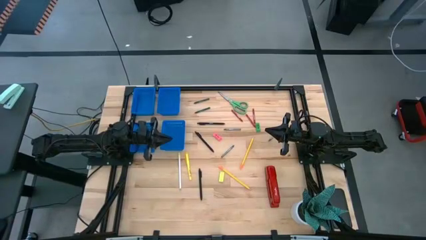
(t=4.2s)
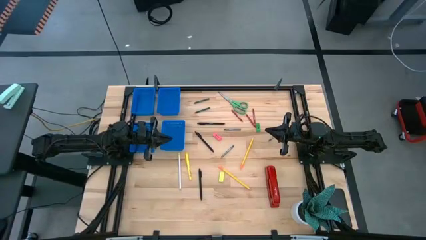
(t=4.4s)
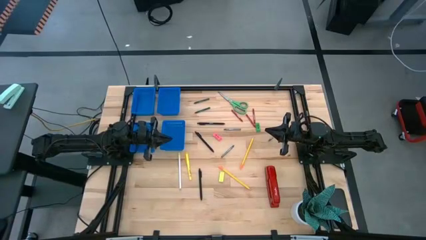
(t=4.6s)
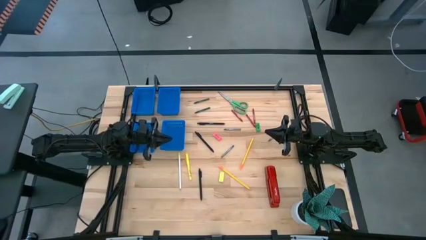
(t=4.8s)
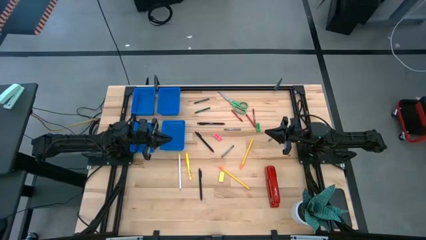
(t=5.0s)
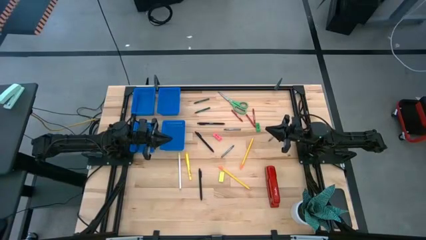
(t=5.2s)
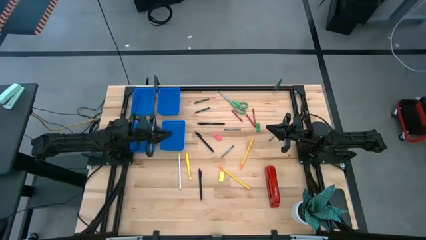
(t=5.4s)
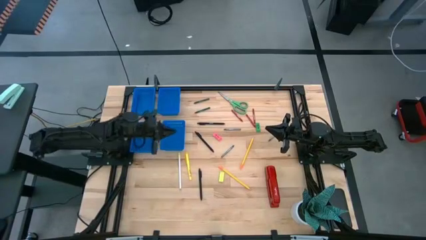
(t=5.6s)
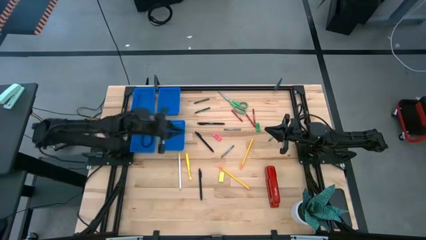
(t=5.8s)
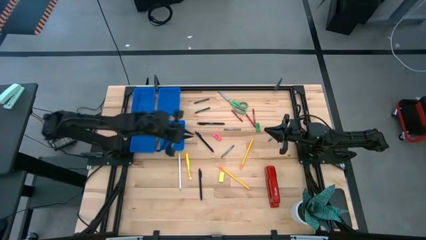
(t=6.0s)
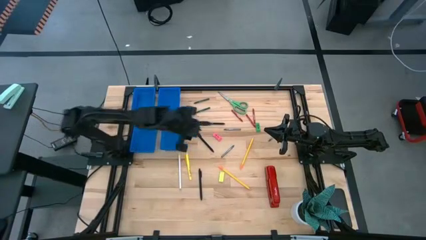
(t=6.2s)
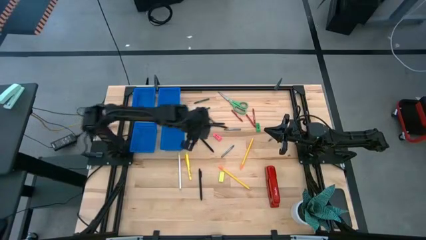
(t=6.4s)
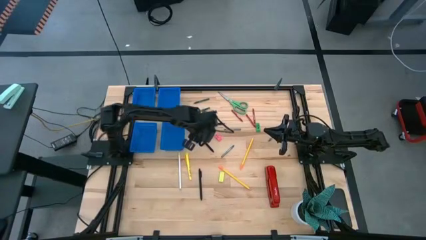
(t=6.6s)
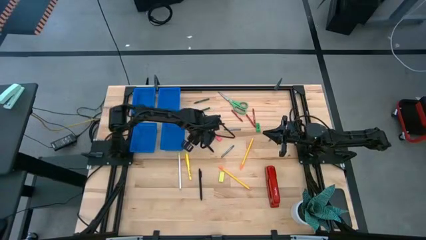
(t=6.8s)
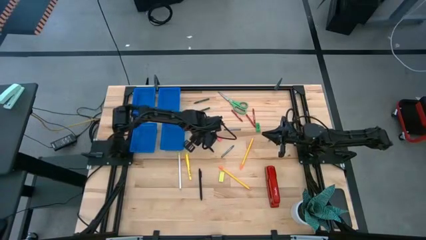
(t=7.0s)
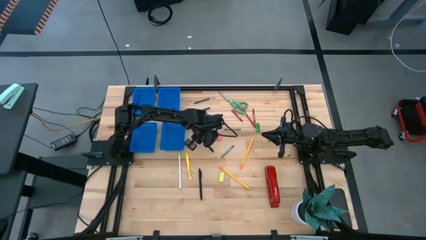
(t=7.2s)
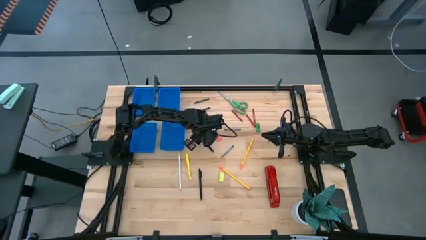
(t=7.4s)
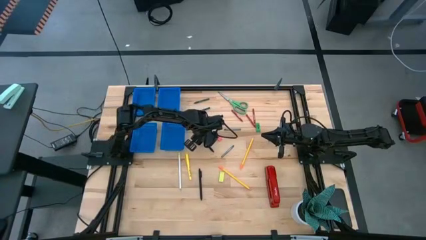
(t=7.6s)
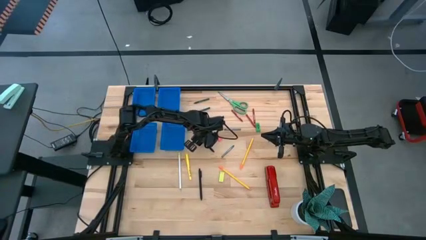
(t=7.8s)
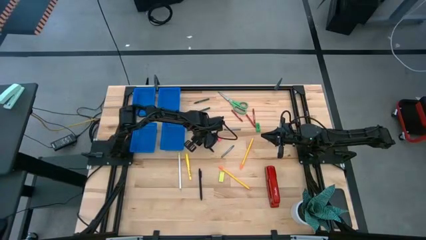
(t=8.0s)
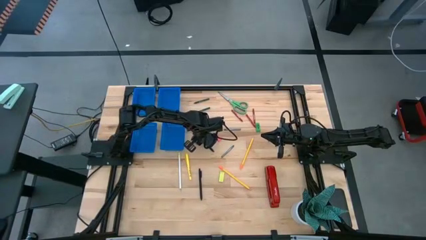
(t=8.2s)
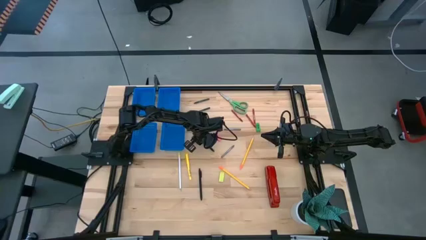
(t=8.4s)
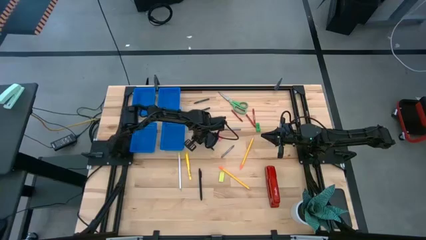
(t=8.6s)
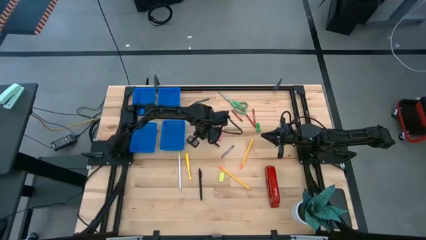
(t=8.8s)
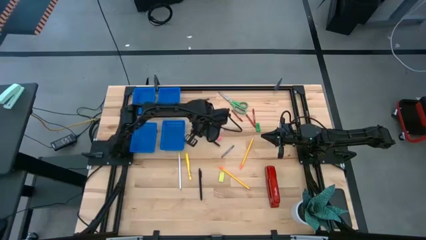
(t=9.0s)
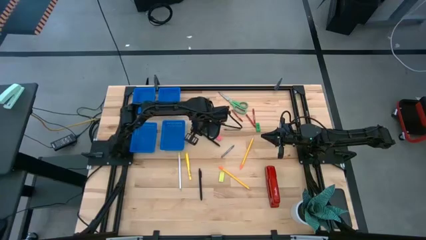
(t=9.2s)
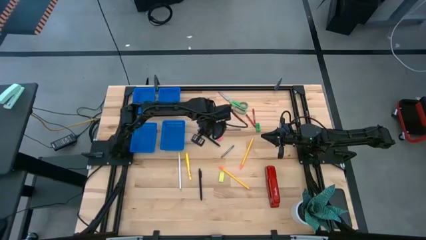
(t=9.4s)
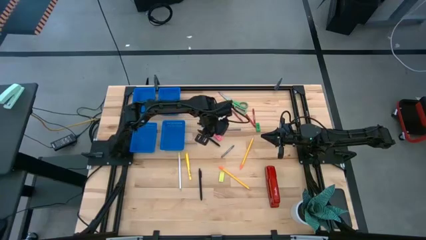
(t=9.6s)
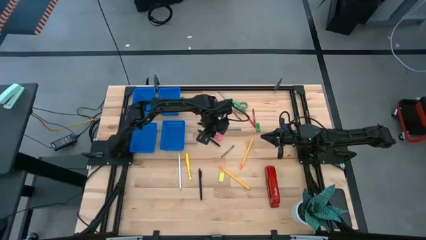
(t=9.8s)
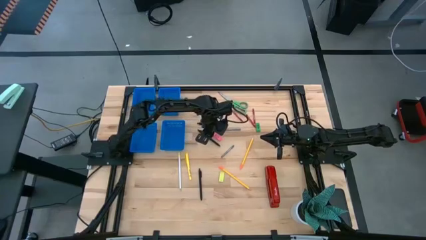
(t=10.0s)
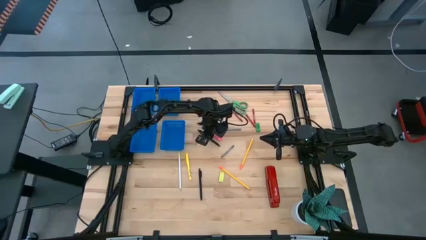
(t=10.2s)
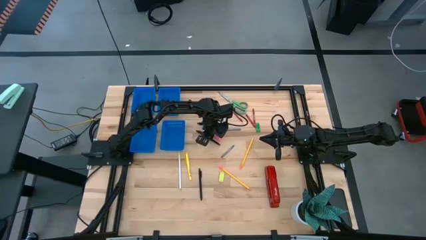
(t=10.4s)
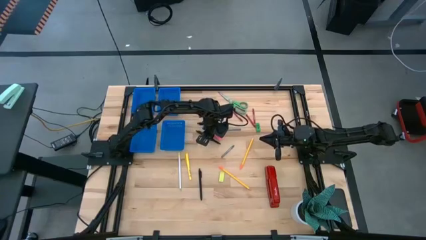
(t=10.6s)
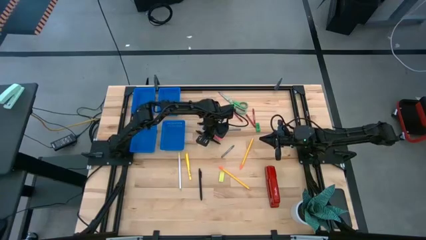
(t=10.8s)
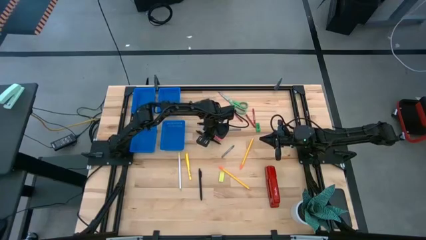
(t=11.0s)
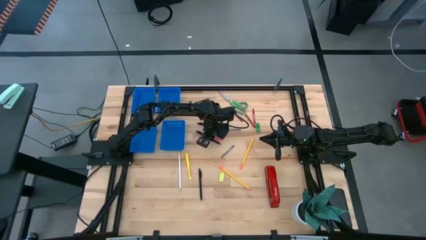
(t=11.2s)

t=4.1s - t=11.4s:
Task: Sort crayons/erasers/pens/pencils in bins
Put the middle black pen into the bottom right blue bin

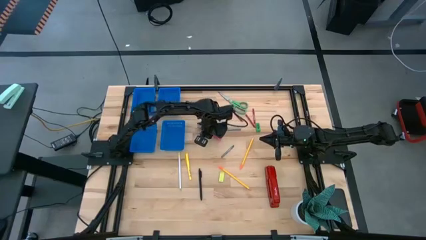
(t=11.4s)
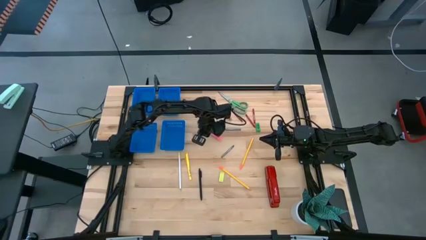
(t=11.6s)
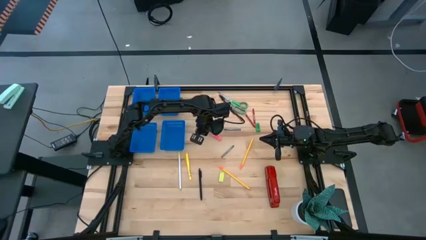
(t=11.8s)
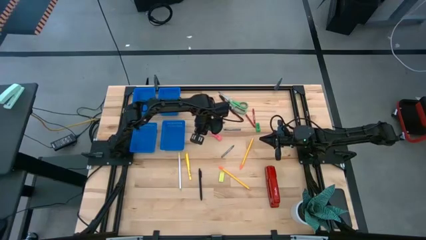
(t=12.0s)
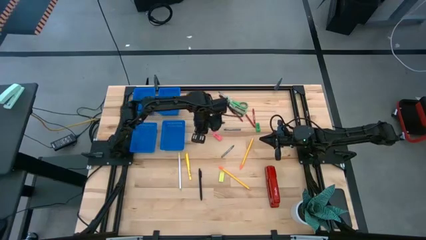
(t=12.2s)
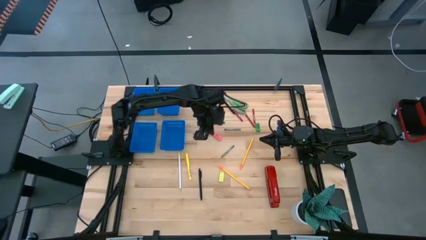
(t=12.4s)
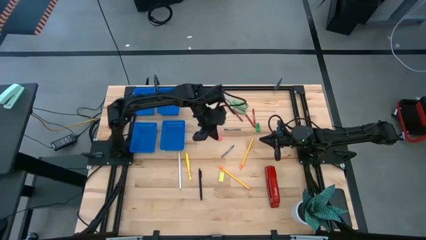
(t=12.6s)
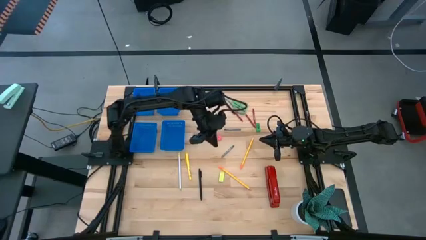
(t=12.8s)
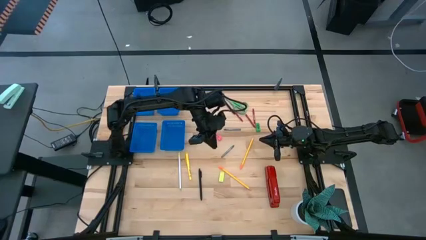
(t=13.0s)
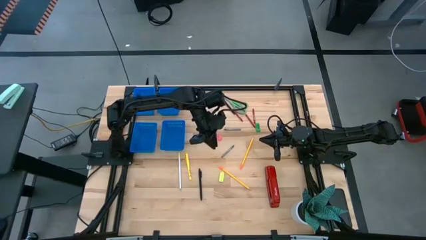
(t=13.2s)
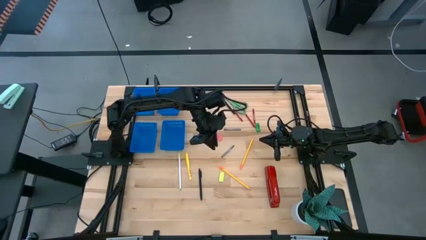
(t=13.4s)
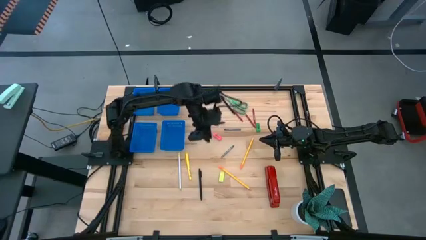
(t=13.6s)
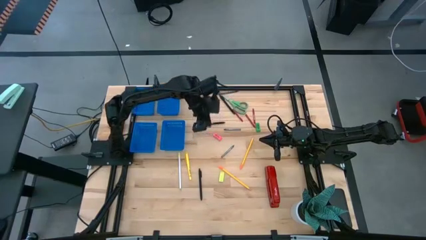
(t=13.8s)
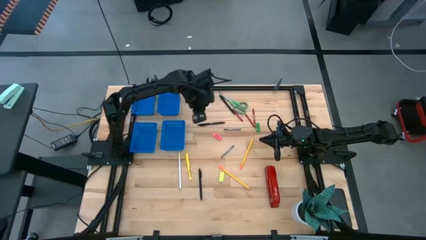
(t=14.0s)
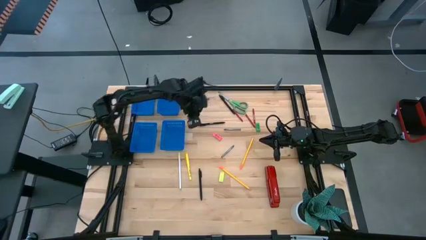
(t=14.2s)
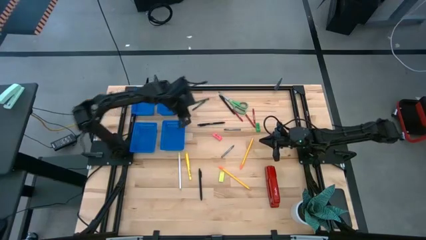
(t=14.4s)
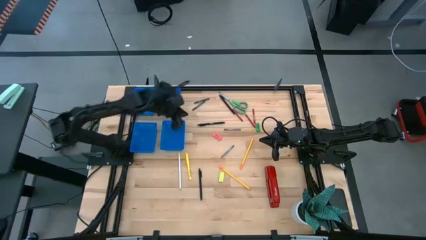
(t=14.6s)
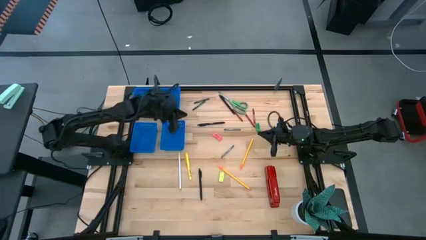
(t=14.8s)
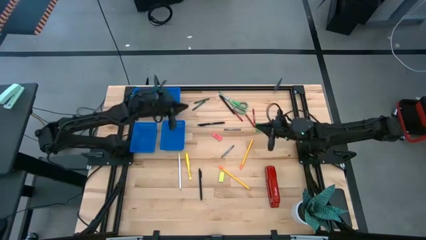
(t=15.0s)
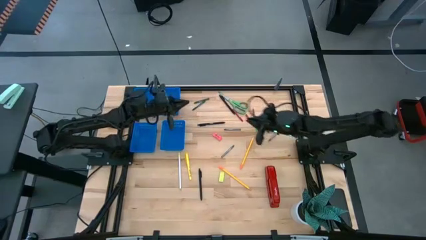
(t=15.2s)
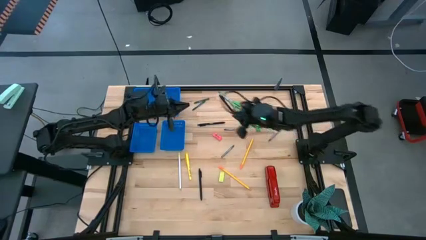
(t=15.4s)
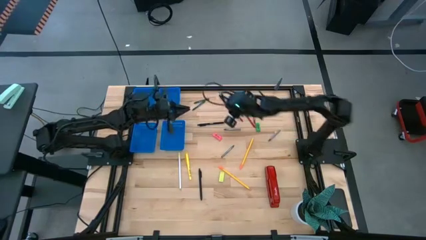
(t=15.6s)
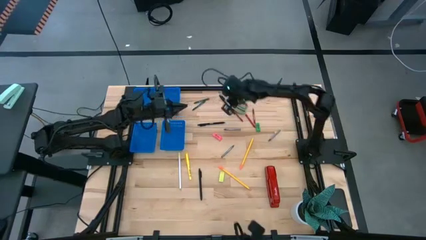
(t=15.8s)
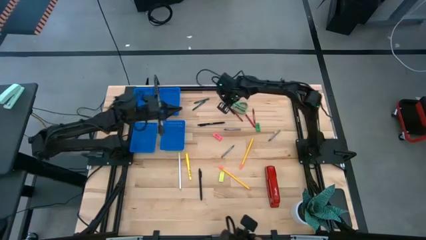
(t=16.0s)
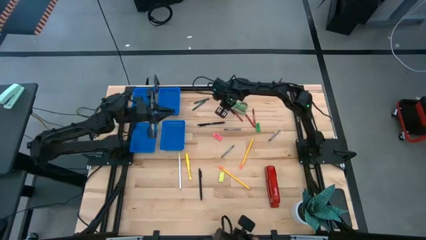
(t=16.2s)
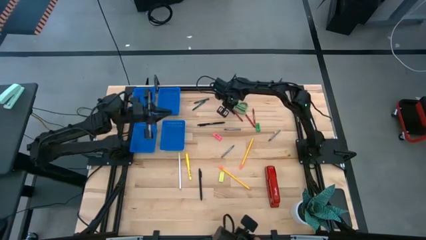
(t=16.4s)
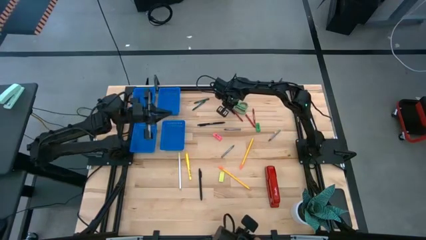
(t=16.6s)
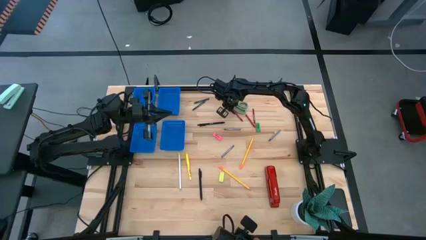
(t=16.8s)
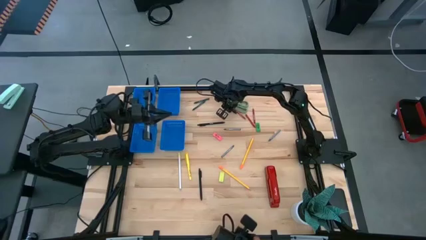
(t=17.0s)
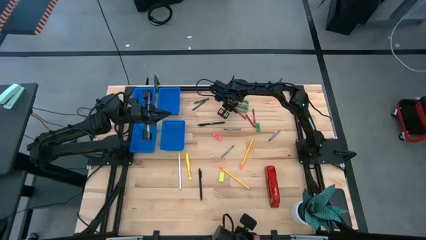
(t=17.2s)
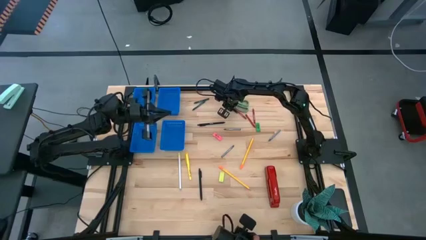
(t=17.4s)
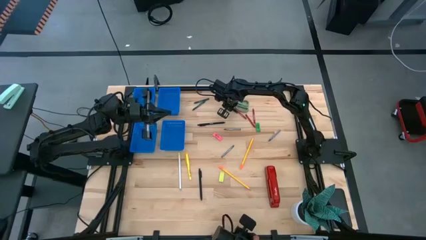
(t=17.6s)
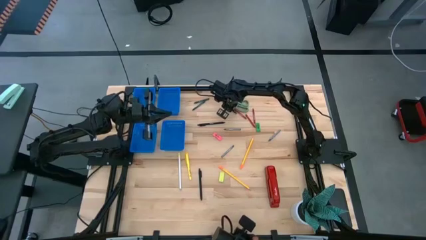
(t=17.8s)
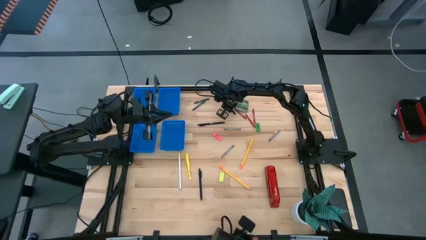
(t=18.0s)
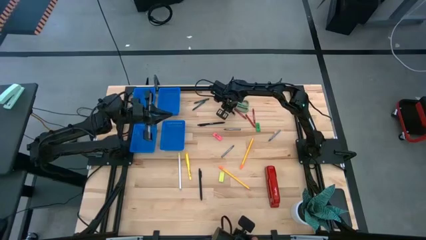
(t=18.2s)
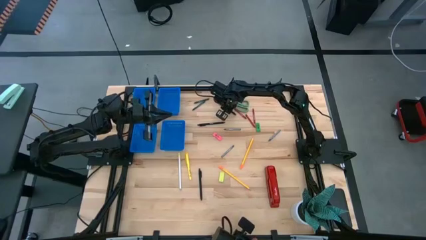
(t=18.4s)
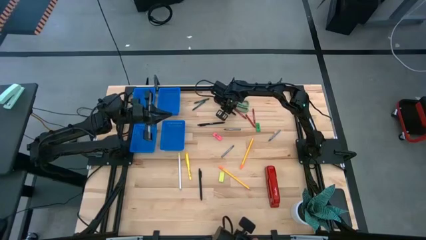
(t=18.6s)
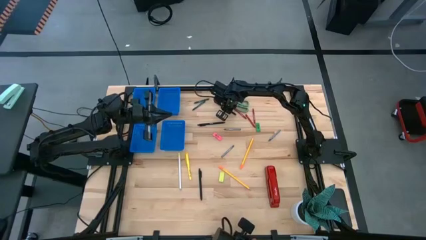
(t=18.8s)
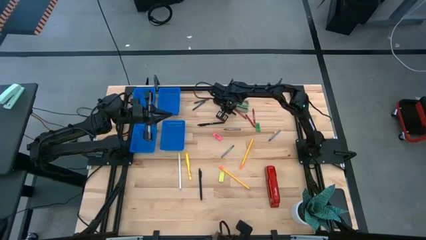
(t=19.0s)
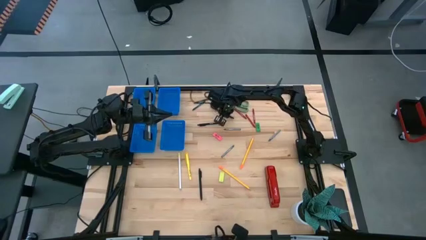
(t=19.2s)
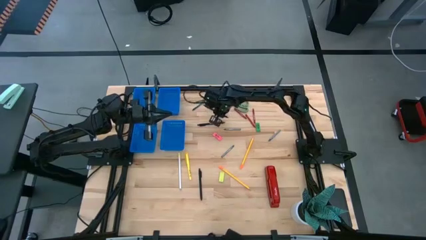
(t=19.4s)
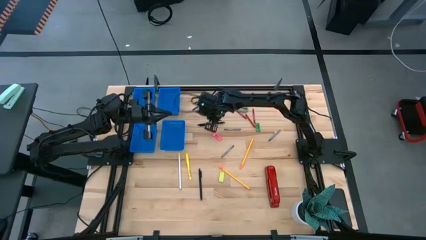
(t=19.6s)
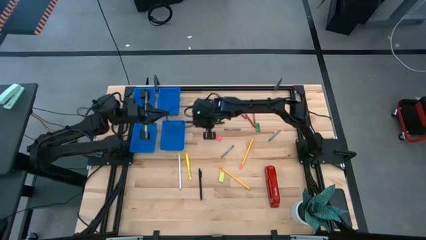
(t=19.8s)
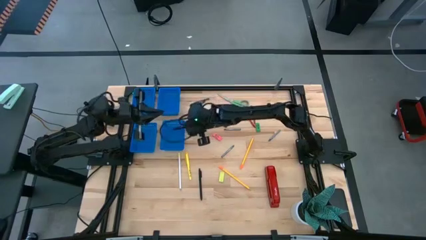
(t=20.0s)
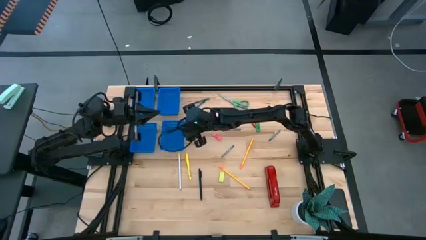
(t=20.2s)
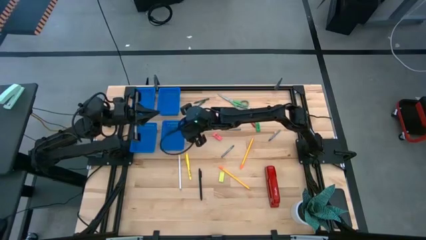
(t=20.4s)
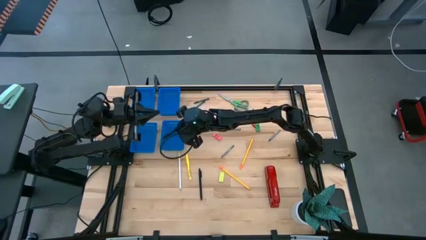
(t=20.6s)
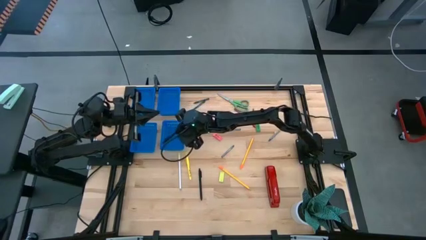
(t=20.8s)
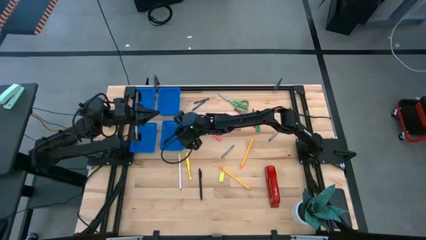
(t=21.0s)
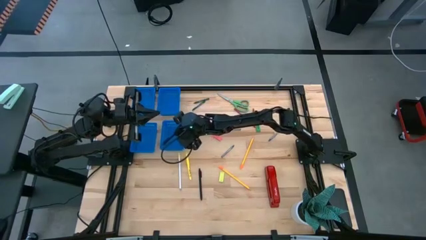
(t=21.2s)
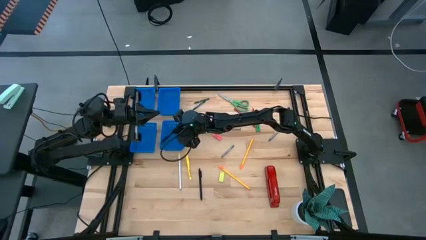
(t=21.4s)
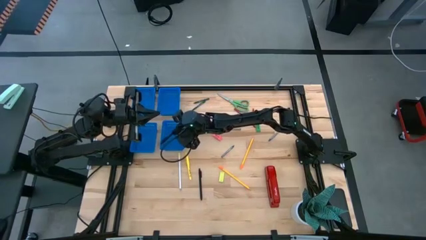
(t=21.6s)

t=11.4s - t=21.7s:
Put the top black pen into the bottom right blue bin
